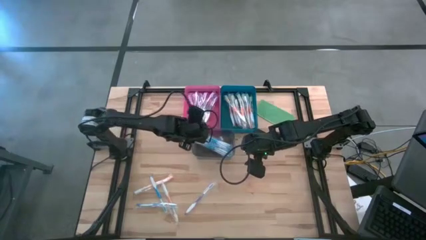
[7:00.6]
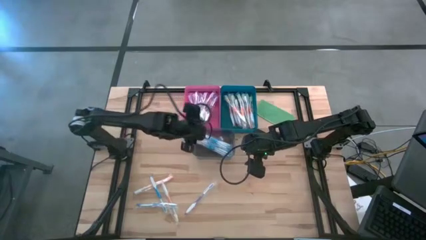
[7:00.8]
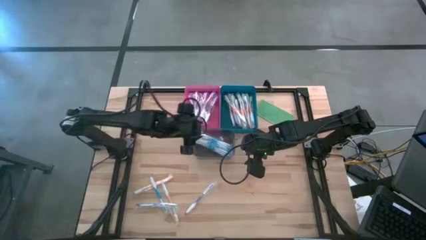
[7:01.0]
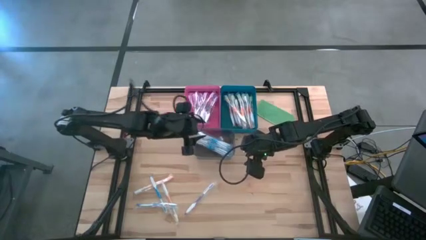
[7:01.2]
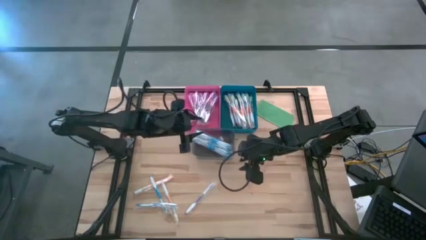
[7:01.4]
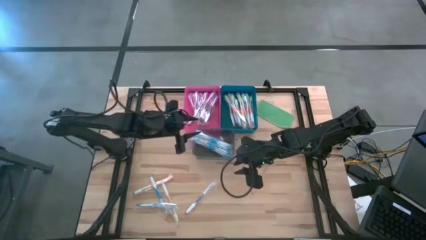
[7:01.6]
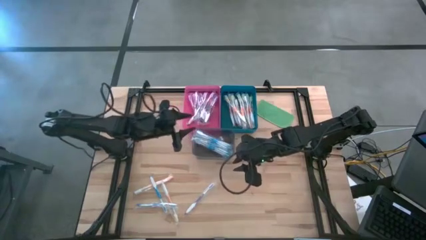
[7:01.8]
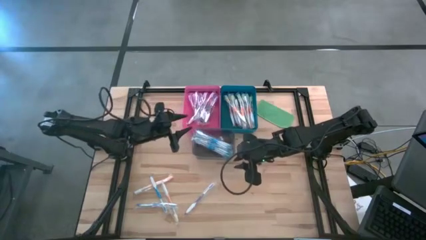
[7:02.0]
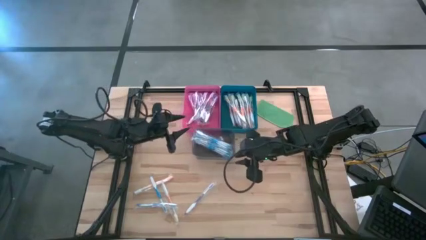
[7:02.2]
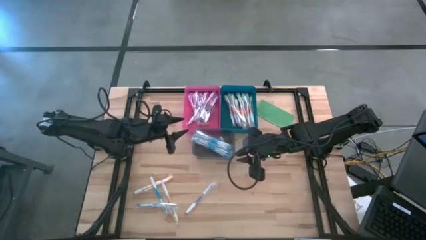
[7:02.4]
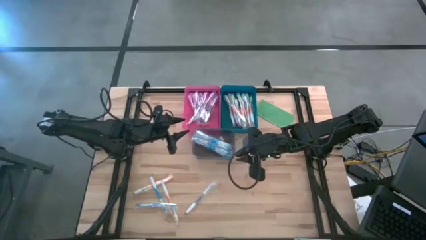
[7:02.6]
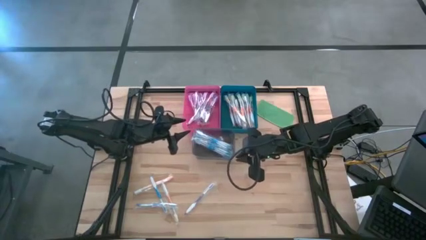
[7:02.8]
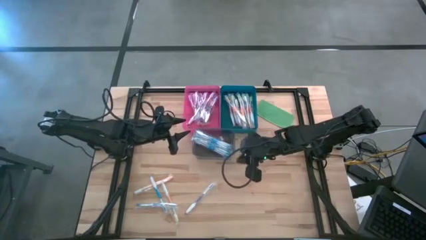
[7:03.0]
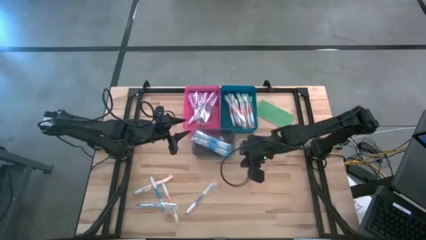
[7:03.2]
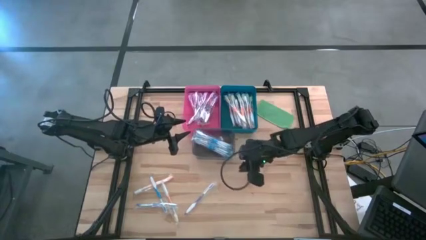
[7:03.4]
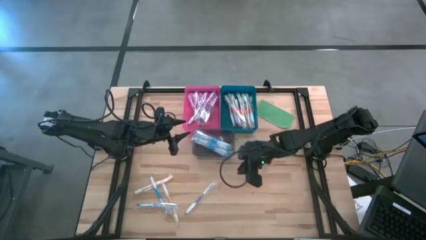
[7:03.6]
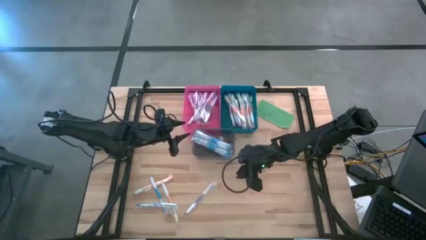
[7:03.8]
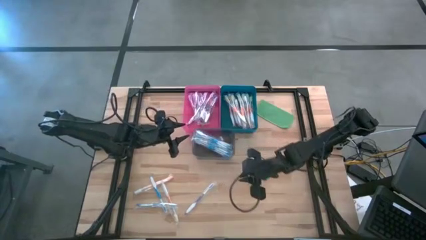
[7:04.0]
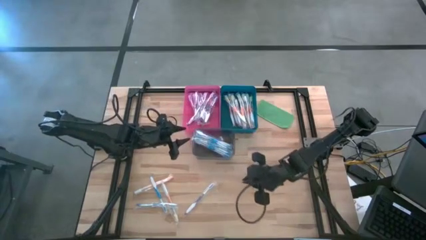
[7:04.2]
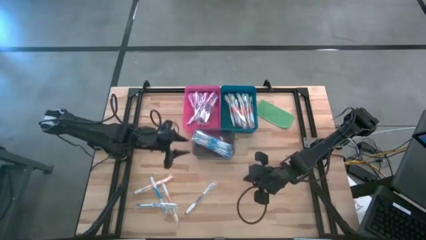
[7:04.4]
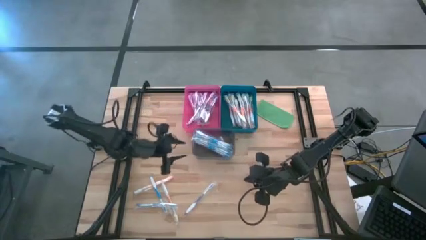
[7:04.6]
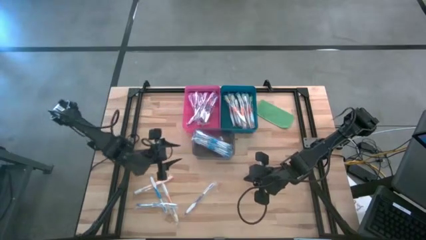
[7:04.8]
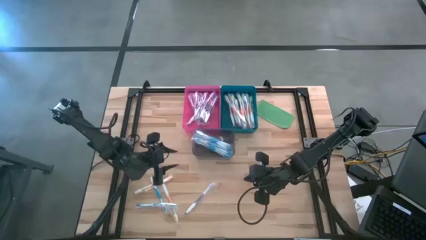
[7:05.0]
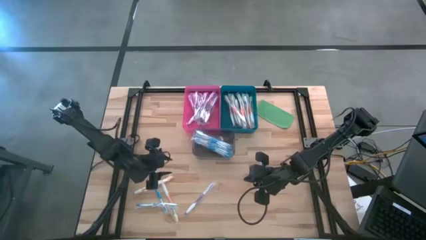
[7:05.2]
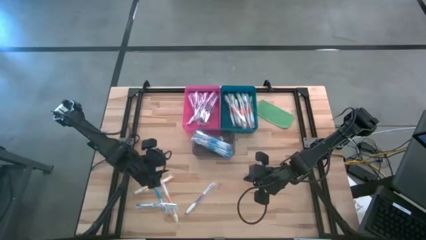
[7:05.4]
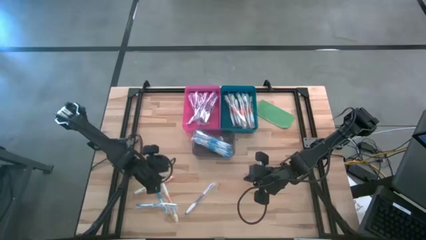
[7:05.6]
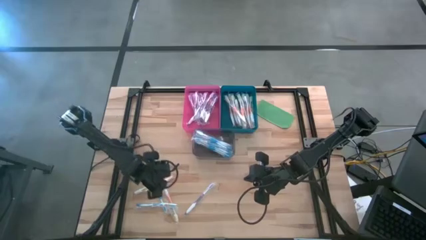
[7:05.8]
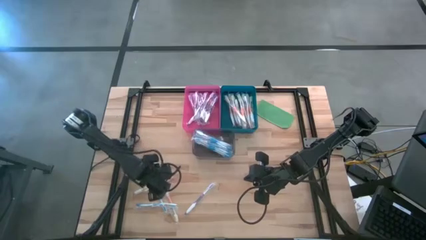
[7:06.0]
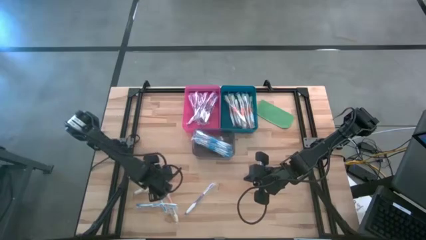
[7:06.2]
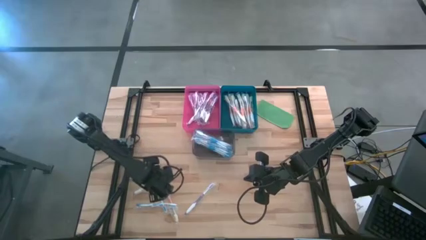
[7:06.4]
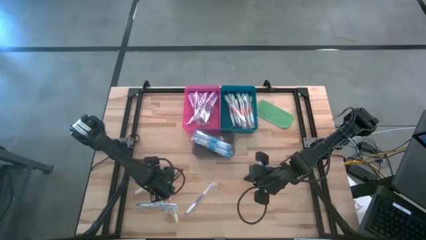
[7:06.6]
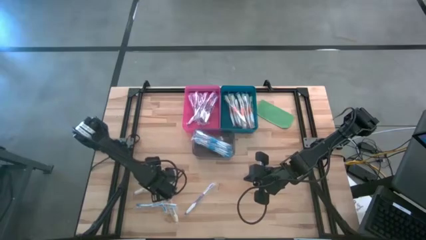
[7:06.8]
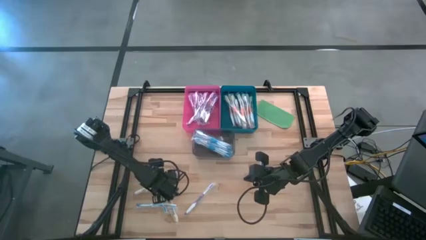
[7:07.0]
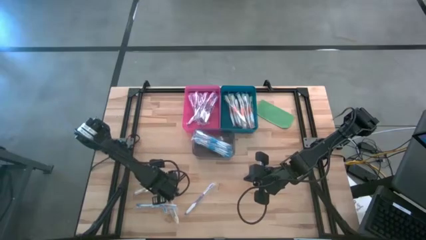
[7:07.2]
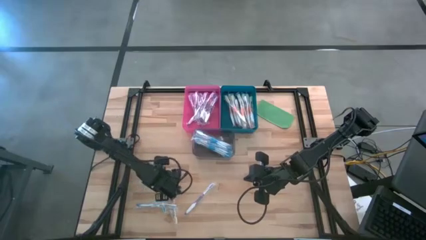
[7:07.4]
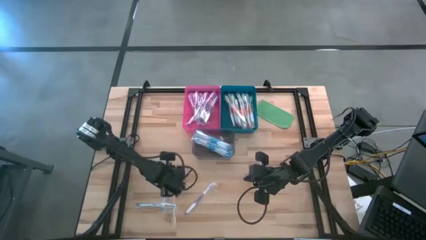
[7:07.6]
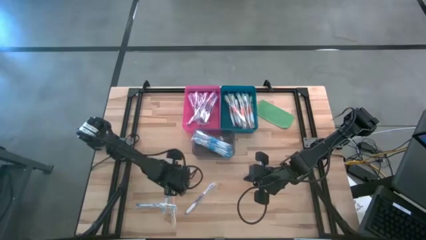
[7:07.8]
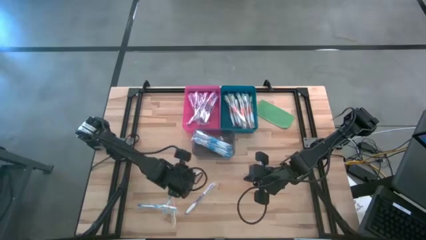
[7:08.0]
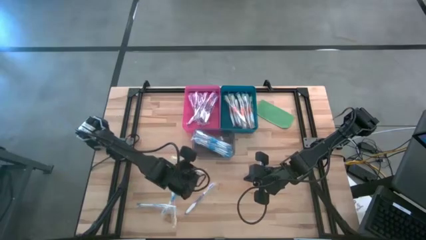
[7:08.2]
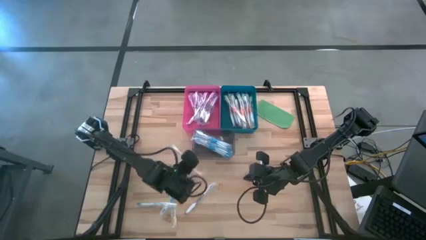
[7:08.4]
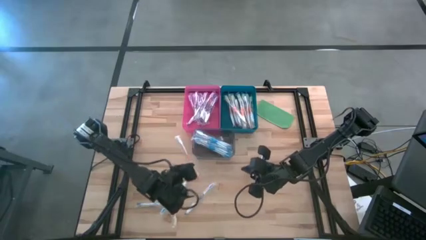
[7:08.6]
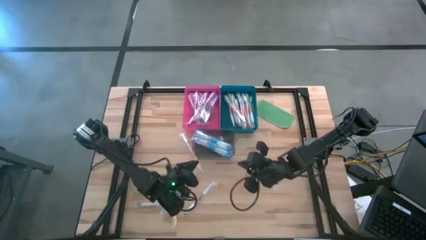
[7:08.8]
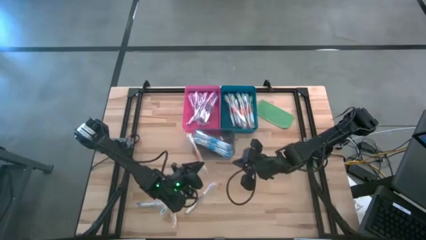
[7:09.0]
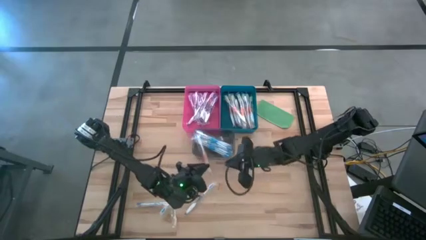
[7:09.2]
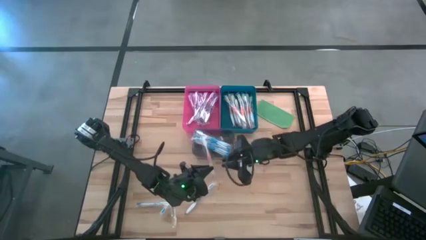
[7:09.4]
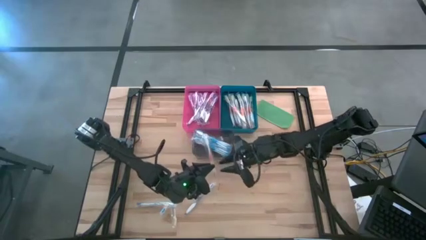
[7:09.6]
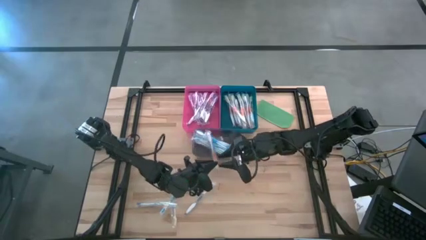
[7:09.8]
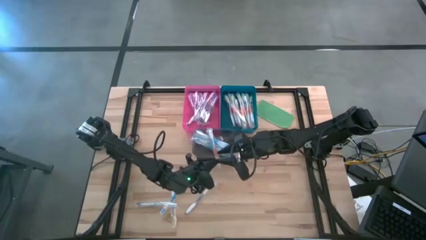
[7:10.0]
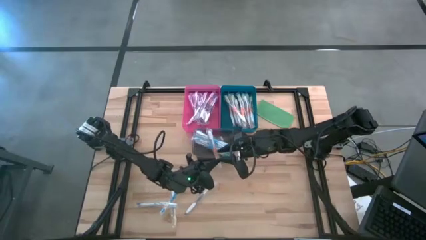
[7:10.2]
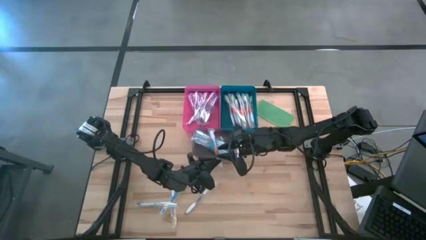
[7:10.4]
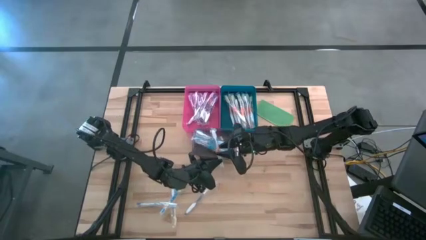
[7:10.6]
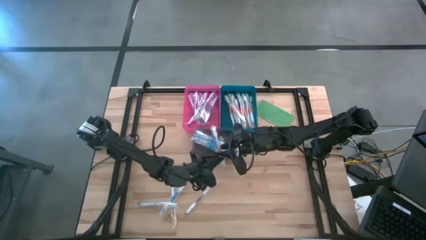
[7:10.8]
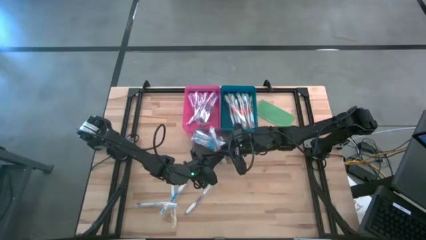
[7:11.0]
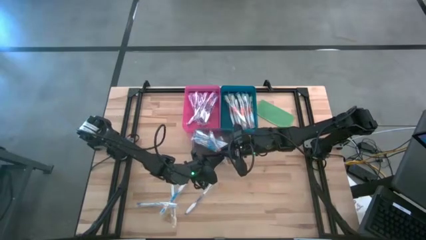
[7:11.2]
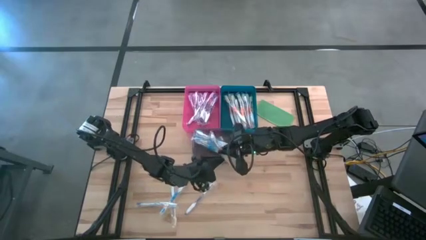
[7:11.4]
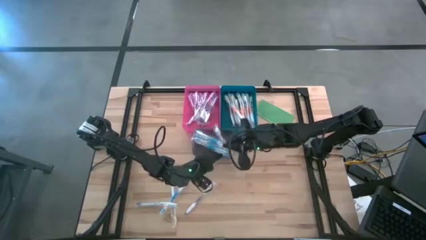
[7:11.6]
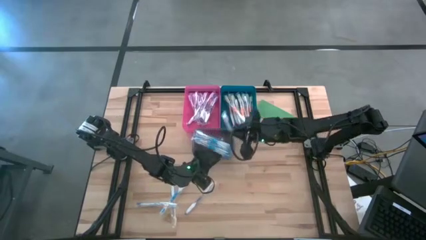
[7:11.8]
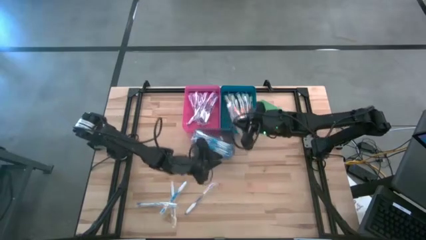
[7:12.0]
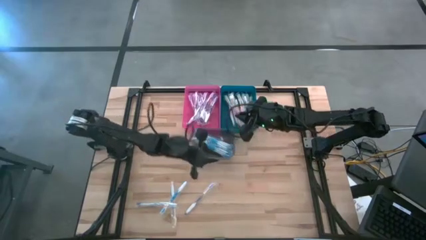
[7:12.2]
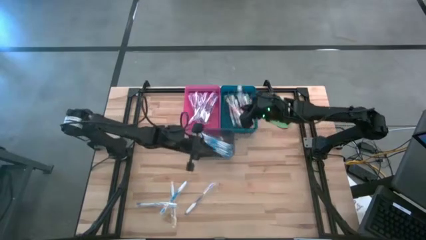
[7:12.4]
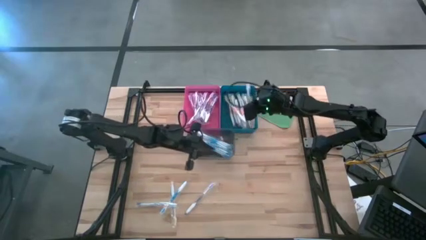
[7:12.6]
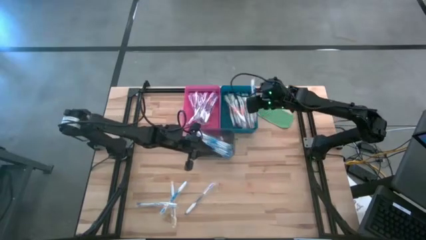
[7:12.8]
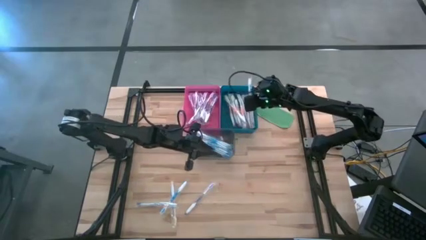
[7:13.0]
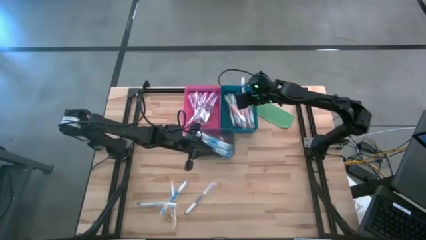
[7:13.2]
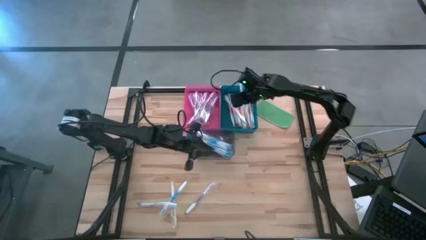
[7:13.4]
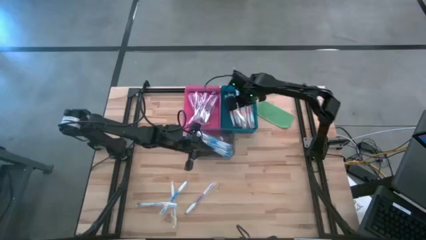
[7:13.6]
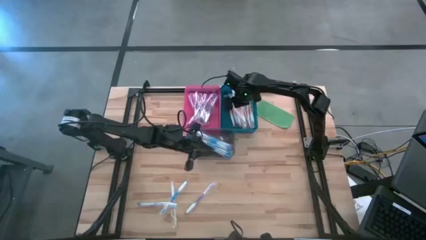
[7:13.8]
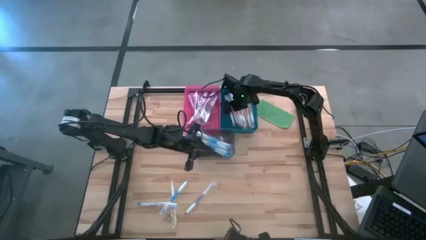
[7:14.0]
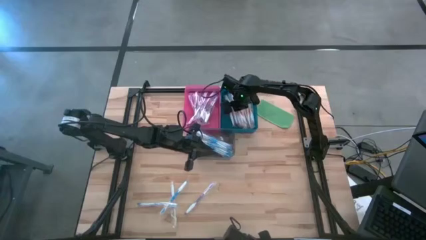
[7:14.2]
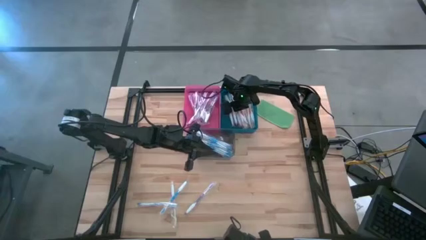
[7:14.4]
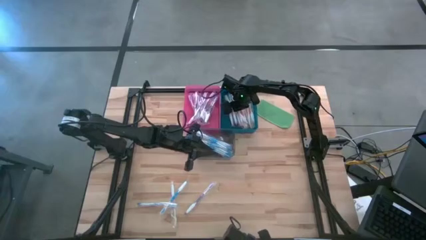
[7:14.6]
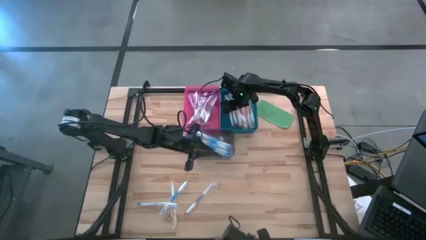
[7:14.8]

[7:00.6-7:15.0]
Task: Pick & Place Toothbrushes
Put the orange toothbrush into the blue bin

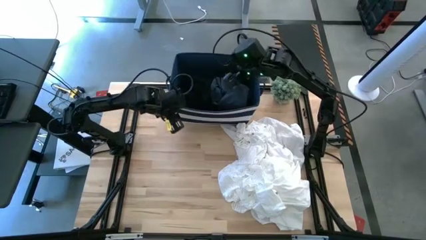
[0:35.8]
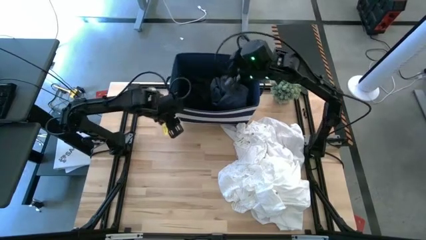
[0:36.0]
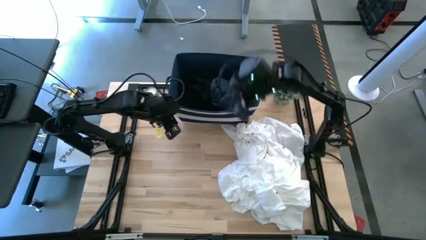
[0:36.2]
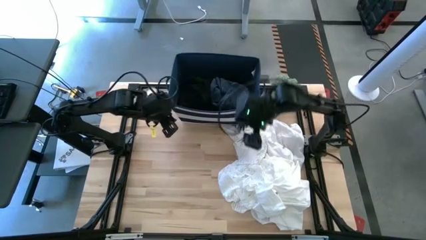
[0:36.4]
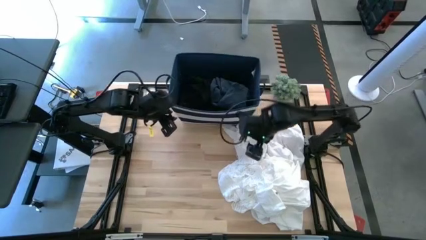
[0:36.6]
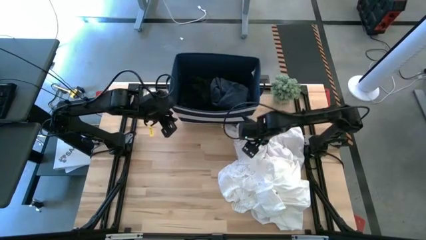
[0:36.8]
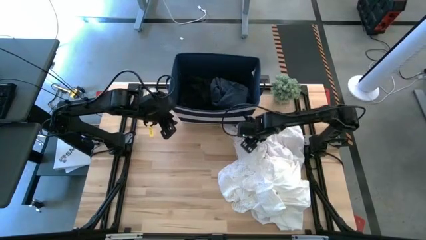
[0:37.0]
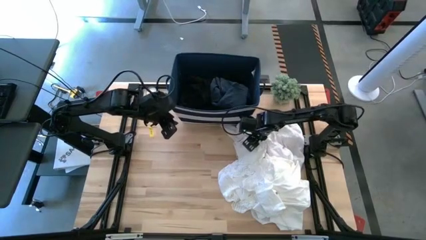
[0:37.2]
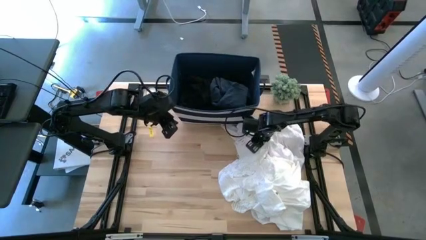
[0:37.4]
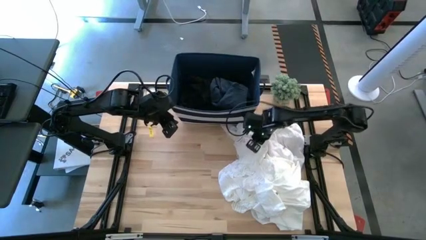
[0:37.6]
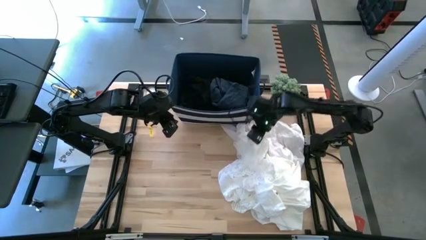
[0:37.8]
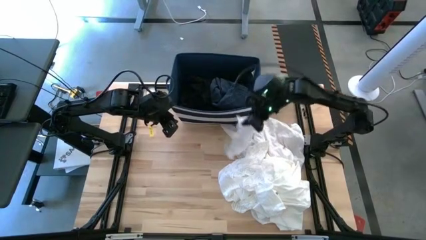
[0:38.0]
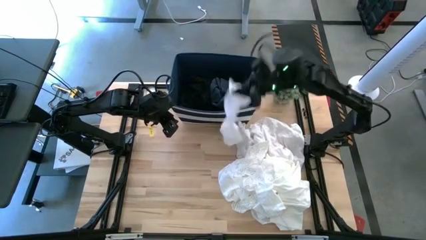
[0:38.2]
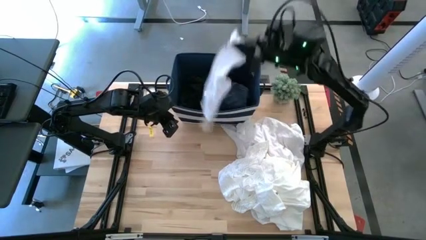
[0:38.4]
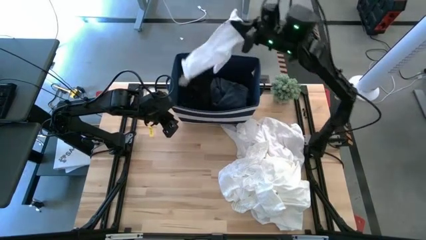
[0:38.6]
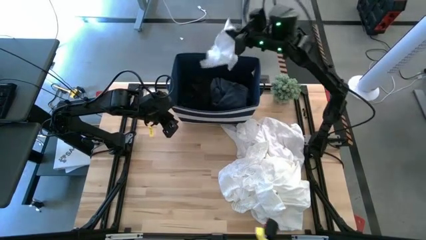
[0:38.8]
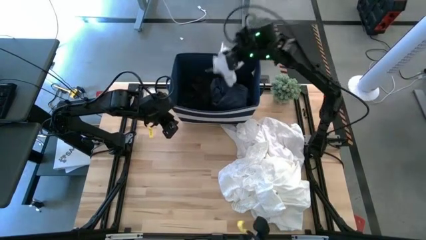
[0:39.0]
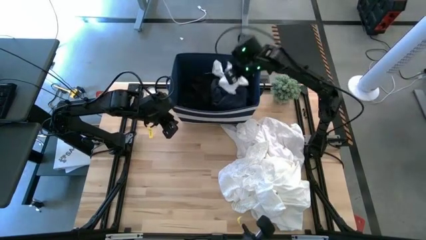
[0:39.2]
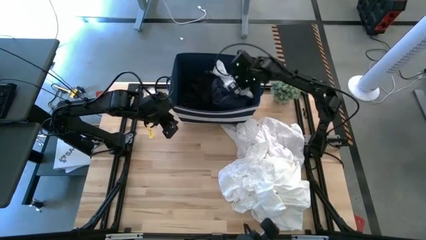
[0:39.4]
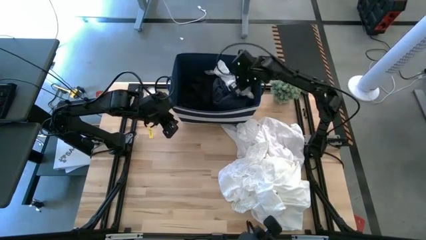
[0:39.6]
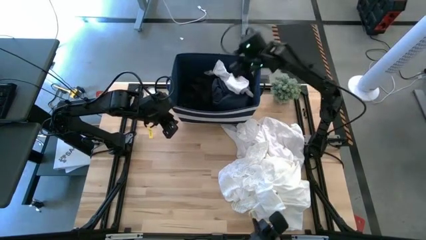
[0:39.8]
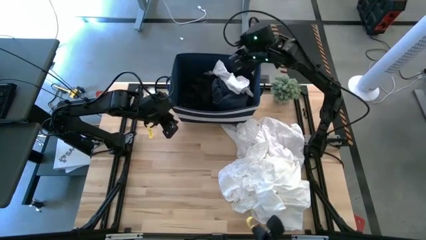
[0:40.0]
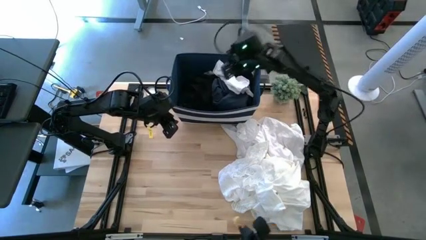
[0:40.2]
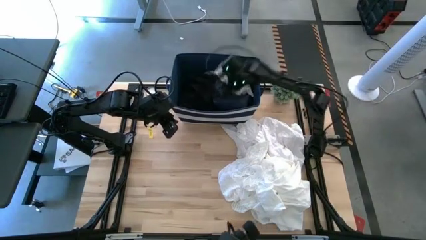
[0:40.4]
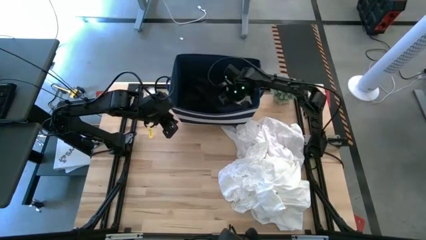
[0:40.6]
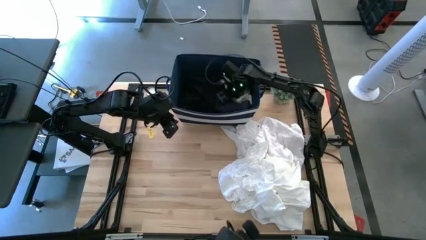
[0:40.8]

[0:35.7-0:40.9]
Task: Sort clothes
Put the white sock into the blue bin
